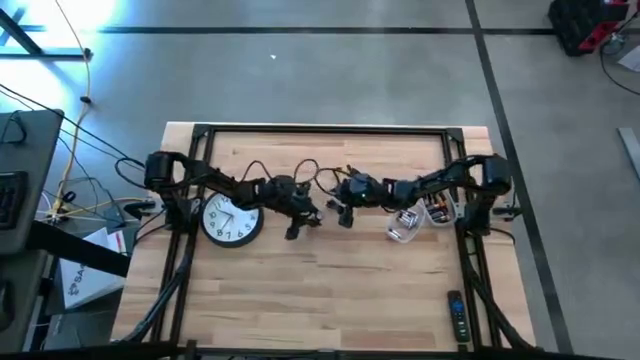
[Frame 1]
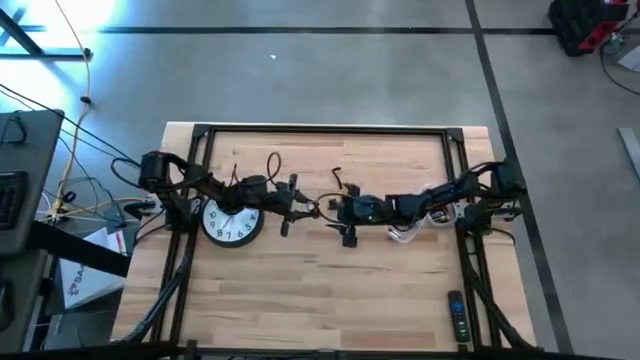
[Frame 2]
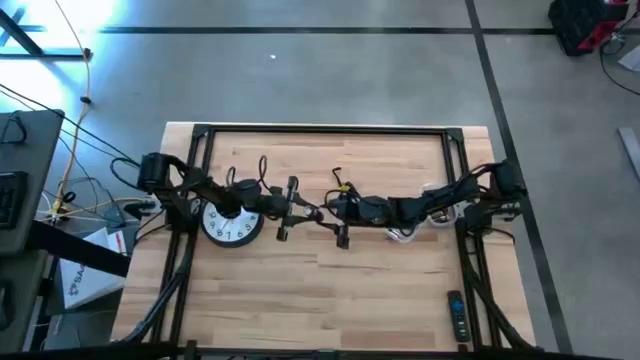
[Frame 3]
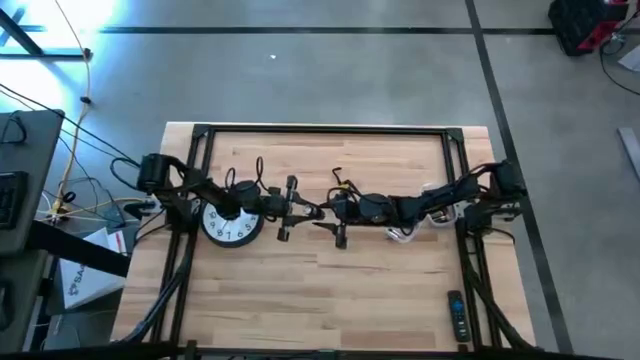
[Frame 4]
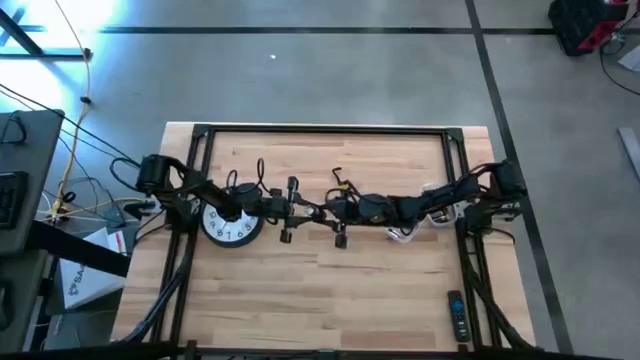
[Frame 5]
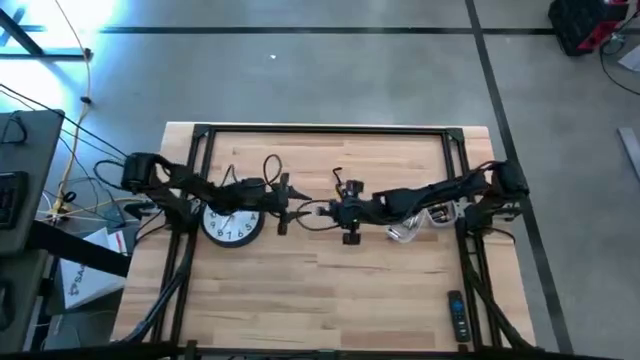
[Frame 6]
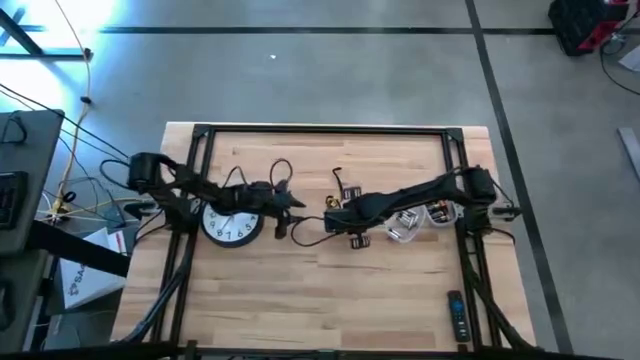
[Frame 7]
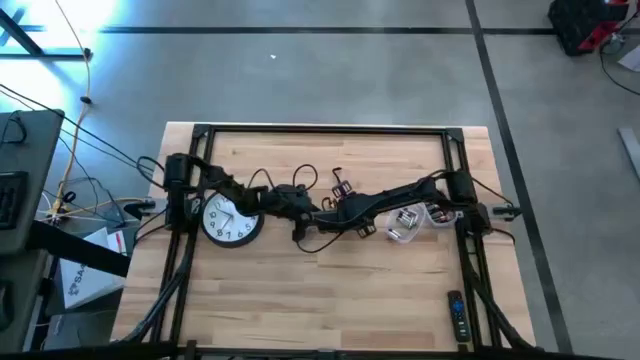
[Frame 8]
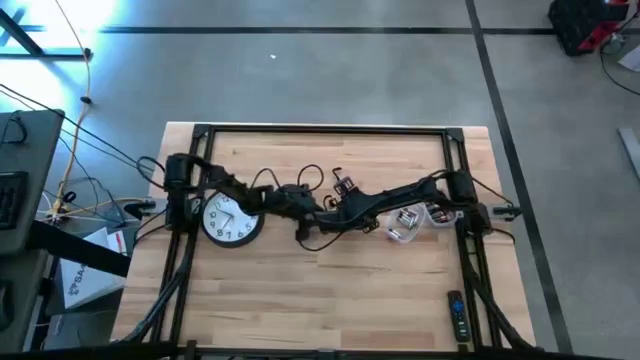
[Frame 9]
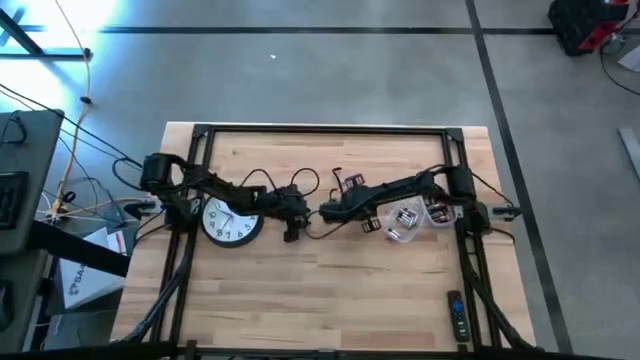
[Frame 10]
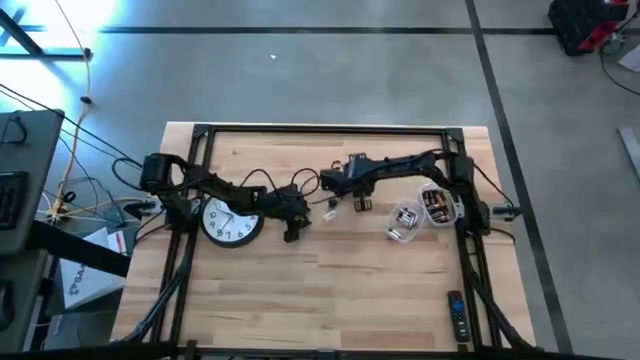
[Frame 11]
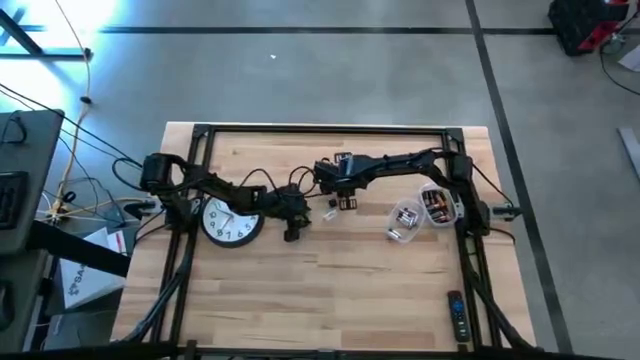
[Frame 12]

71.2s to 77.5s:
Task: Insert battery
Remove the white battery case from the black flashlight

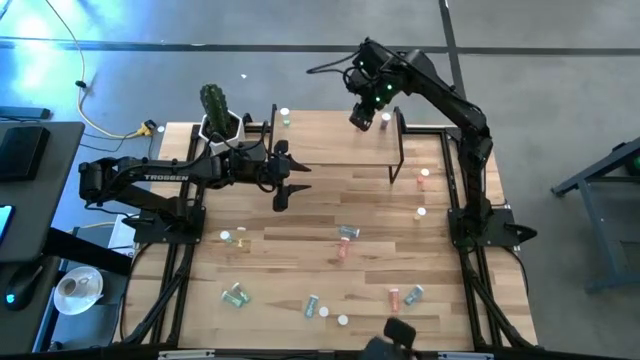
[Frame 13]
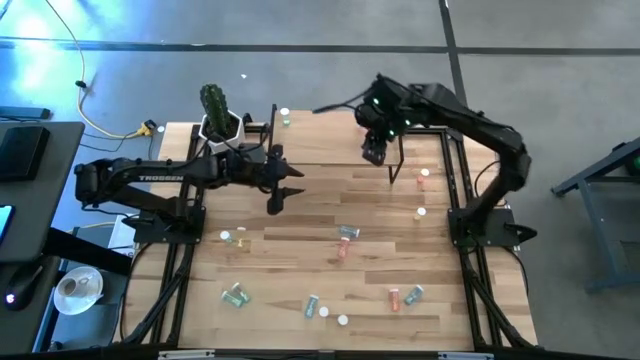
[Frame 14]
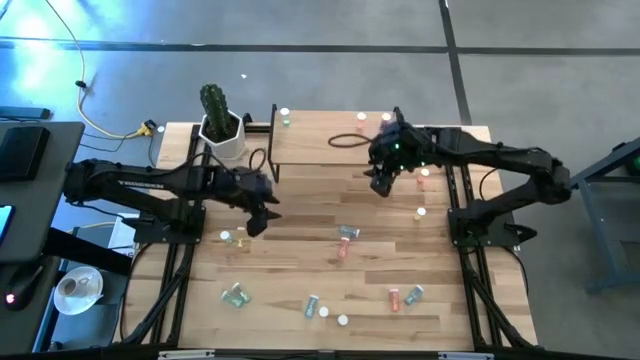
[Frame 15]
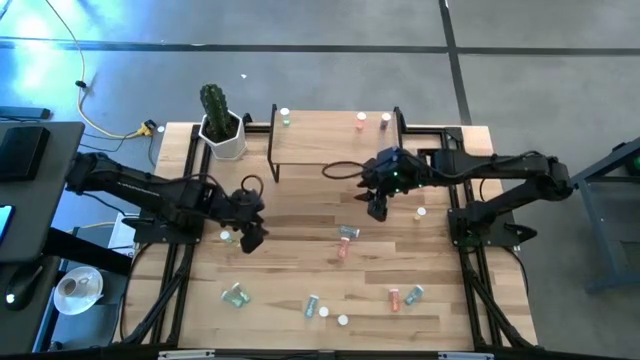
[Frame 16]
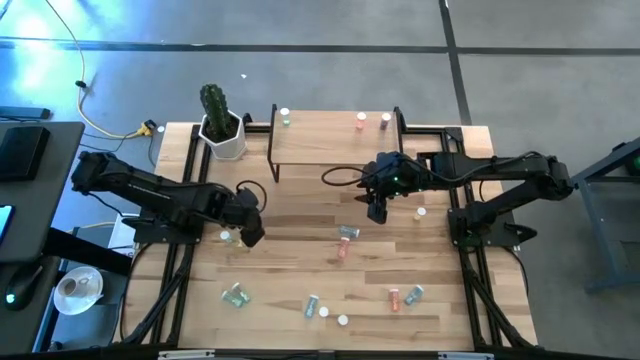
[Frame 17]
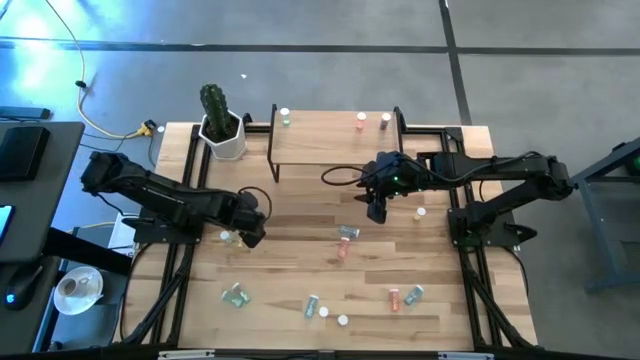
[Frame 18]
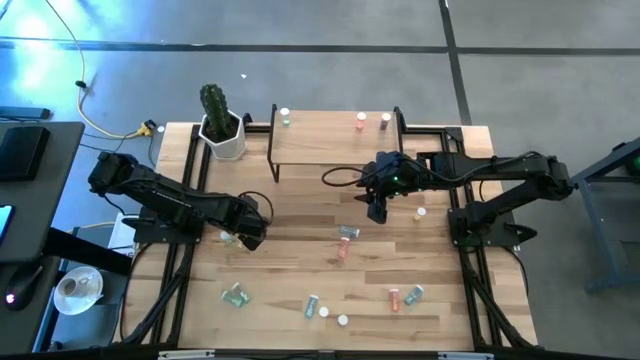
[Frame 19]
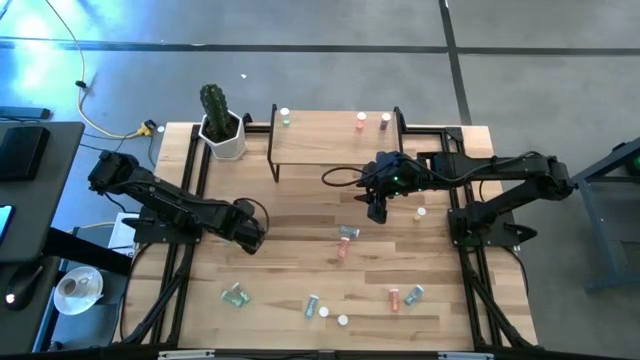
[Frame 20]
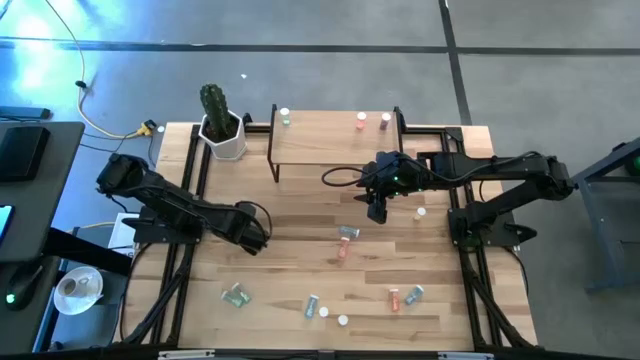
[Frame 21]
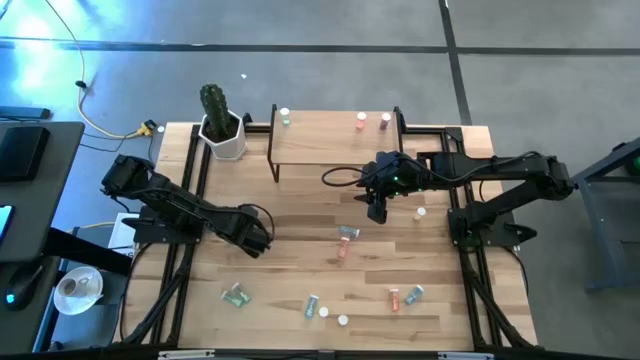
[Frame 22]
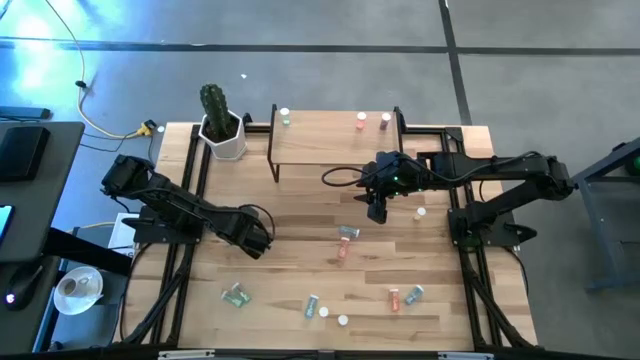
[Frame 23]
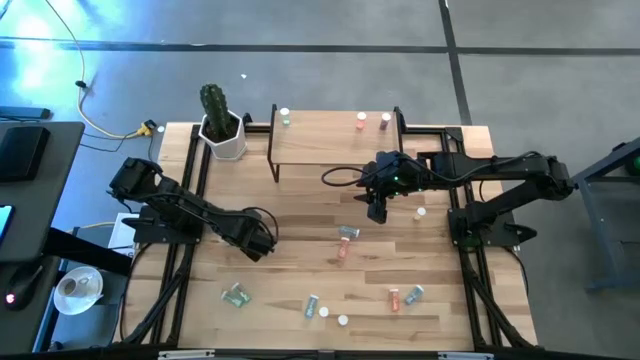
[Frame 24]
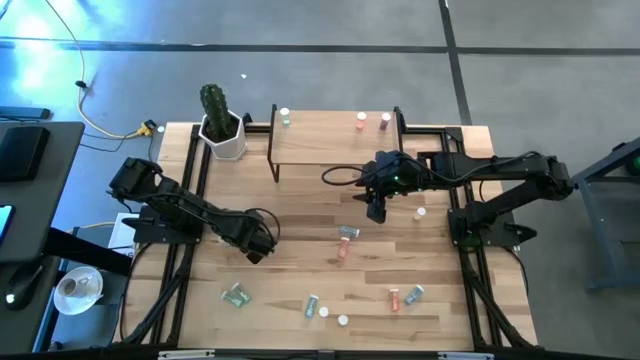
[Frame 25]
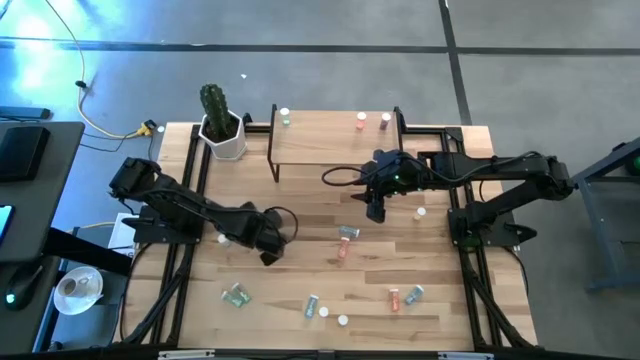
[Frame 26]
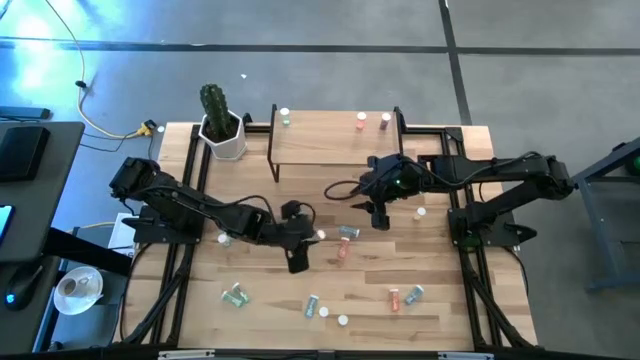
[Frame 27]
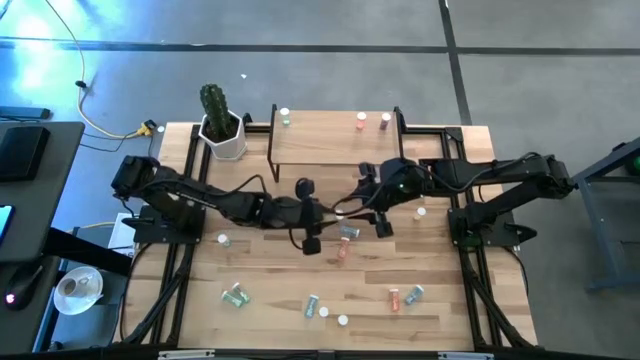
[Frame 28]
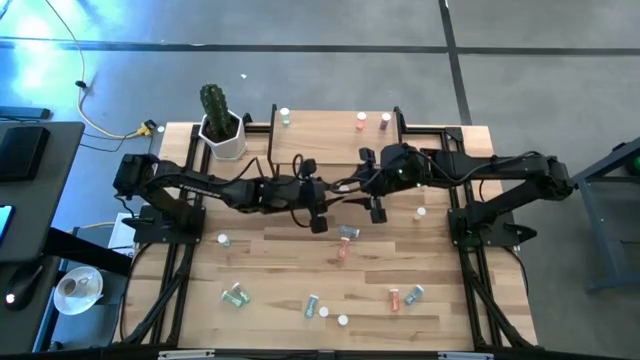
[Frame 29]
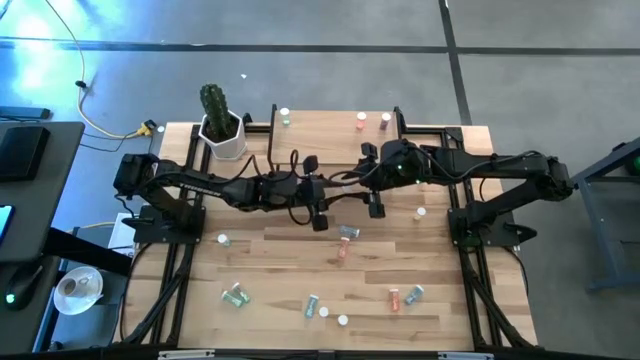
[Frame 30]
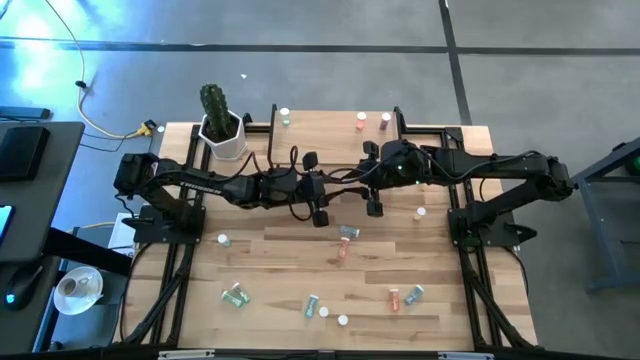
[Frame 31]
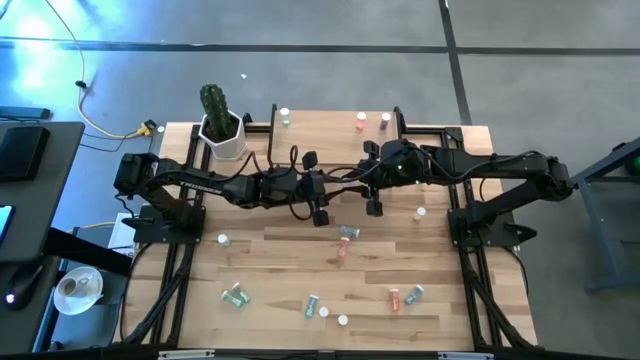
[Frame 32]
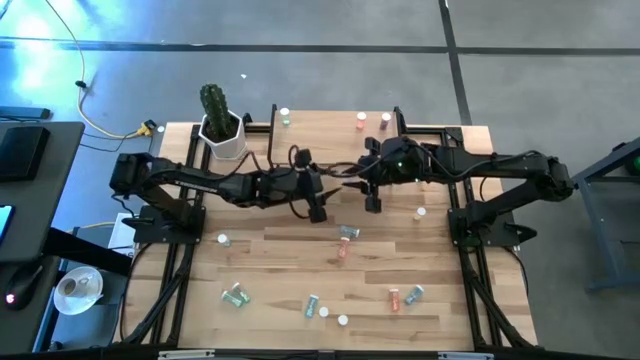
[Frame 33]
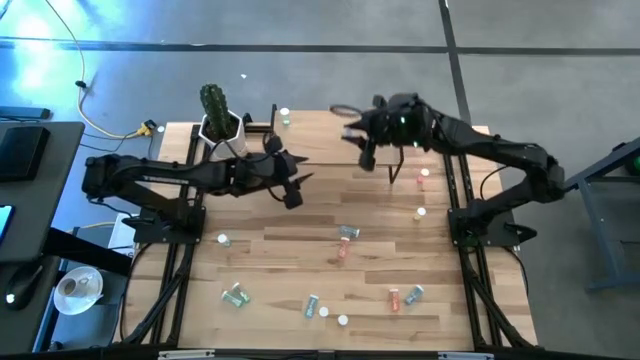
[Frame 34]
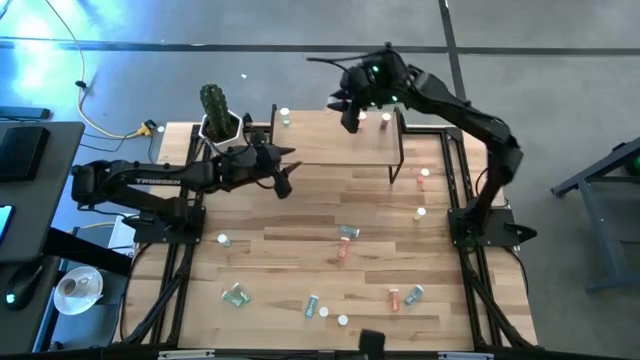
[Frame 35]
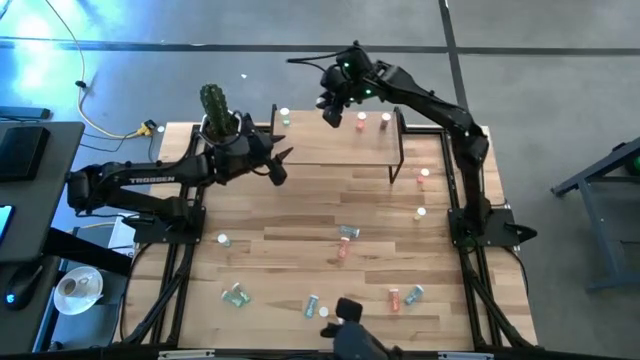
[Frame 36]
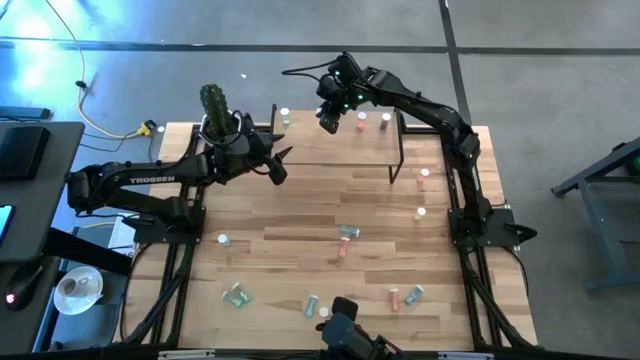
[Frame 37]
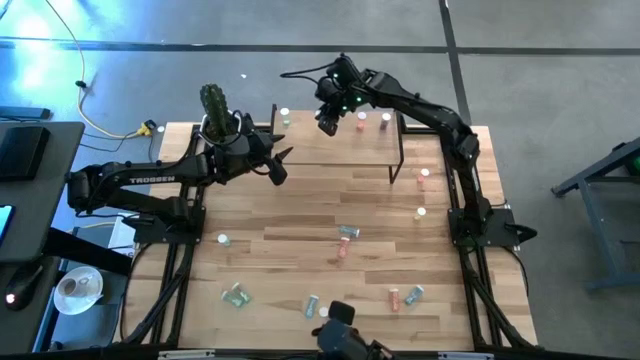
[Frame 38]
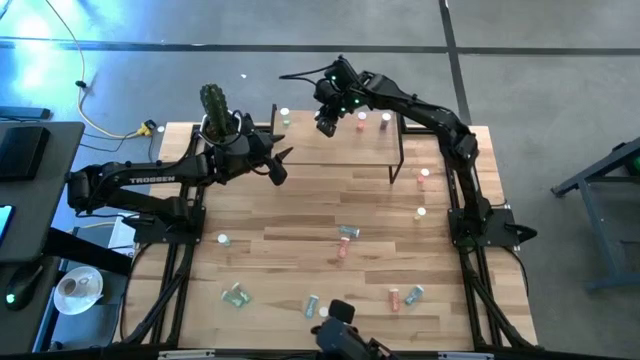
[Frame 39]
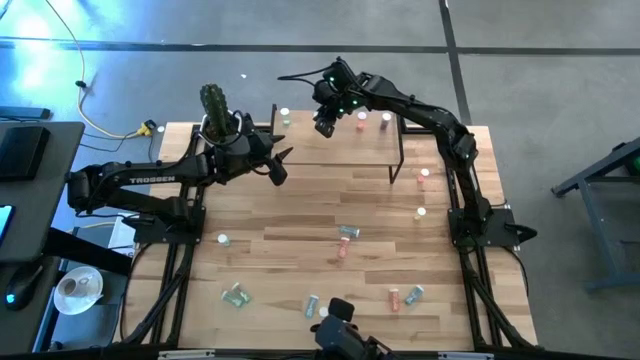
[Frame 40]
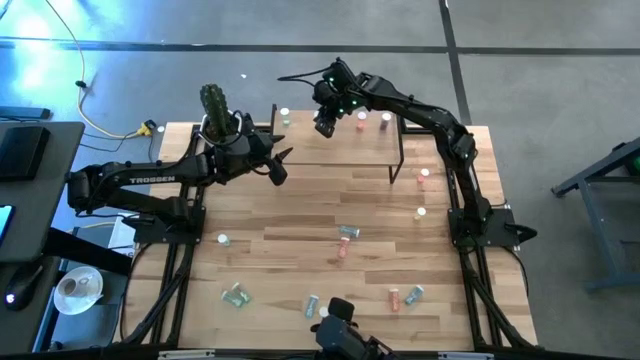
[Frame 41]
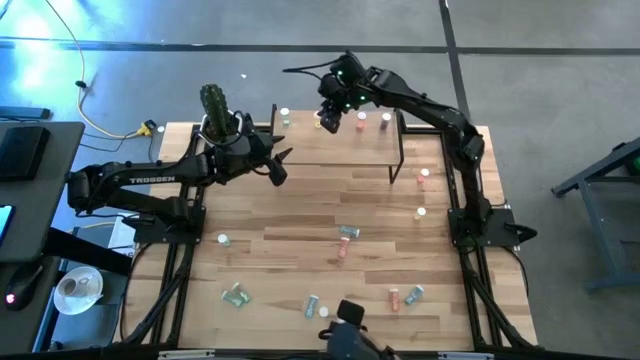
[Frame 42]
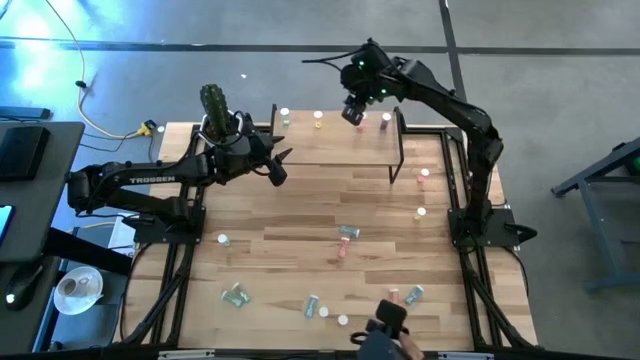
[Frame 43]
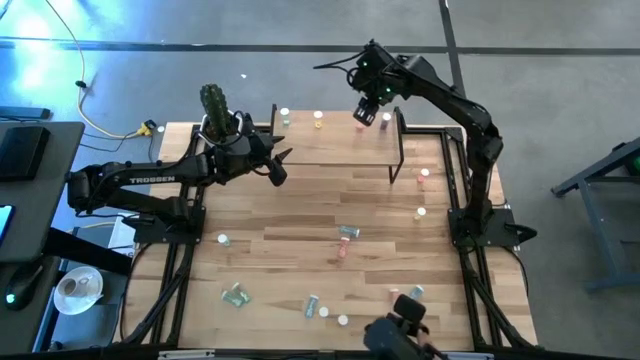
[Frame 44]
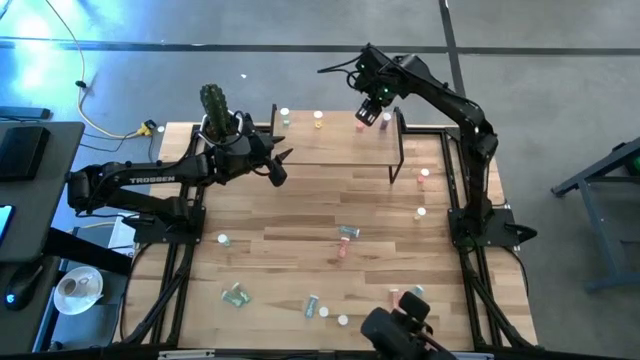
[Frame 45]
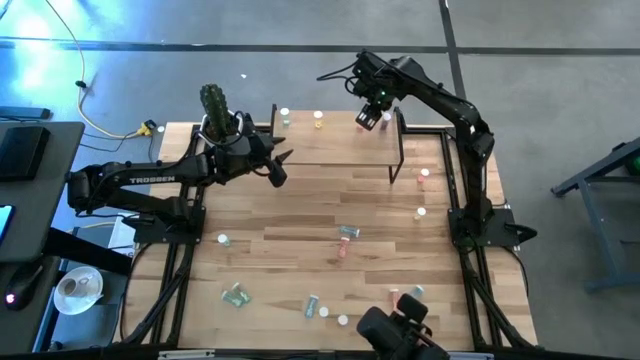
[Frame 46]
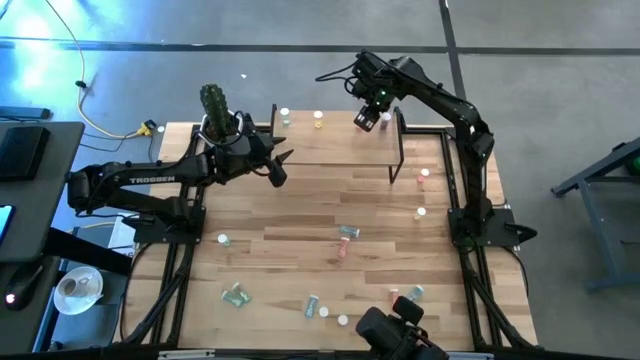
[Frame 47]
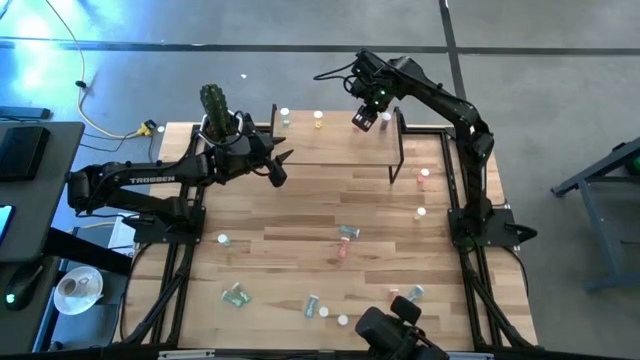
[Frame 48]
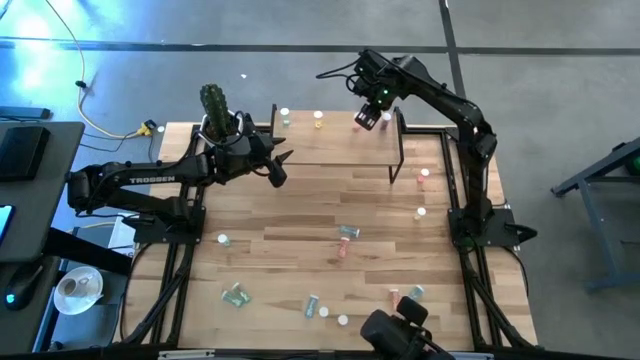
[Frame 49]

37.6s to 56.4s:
Task: Pick and place medicine bottles onto shelf by color
Put the yellow pill bottle on the shelf
